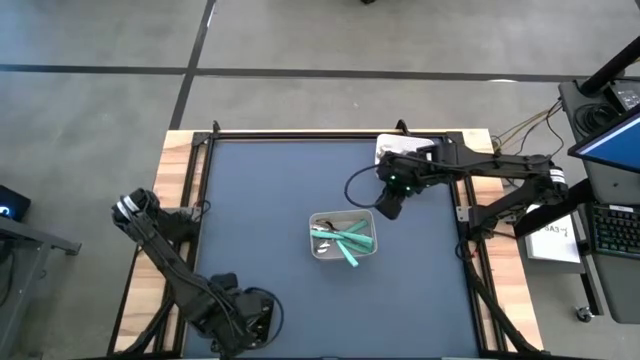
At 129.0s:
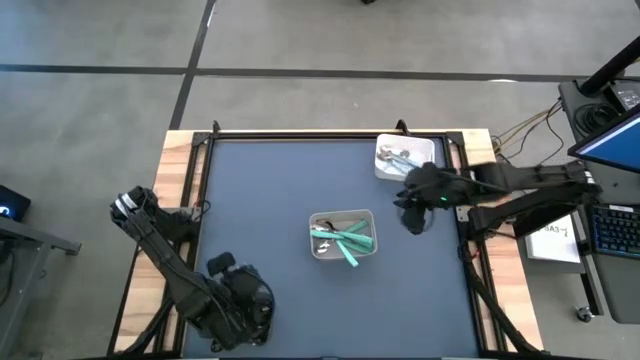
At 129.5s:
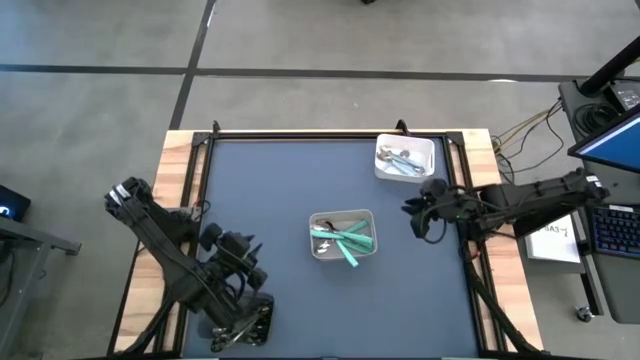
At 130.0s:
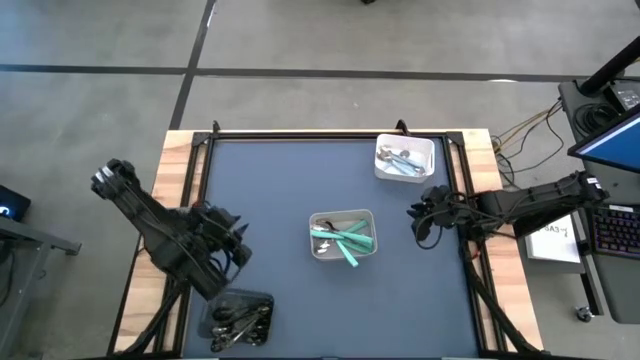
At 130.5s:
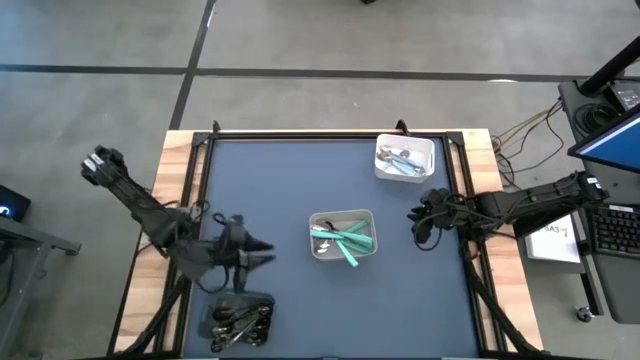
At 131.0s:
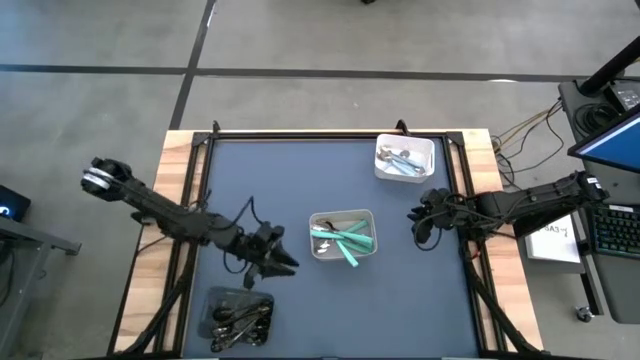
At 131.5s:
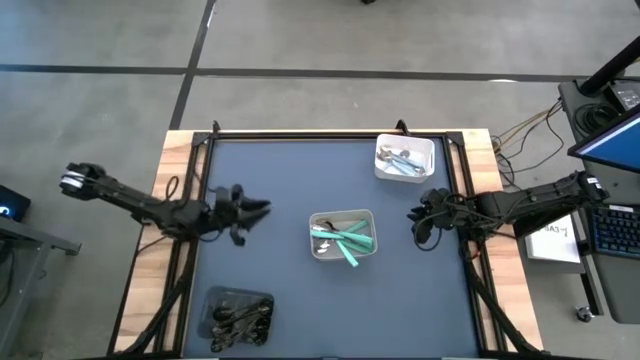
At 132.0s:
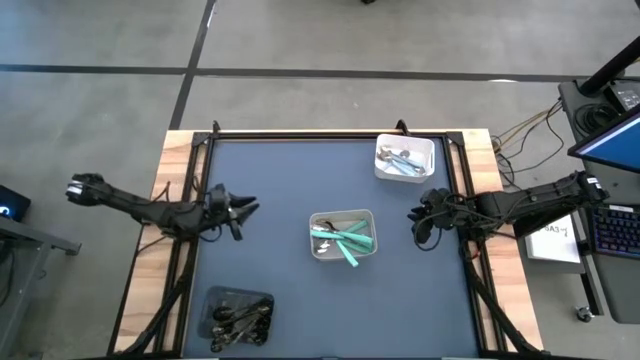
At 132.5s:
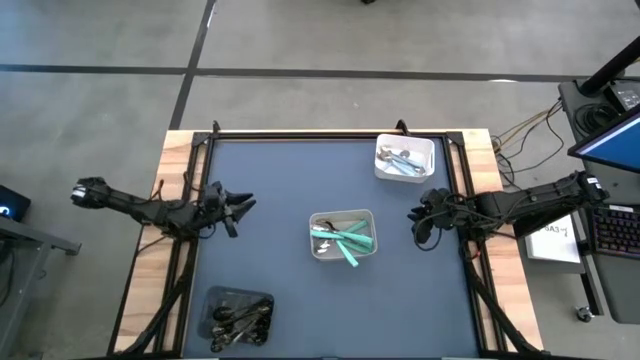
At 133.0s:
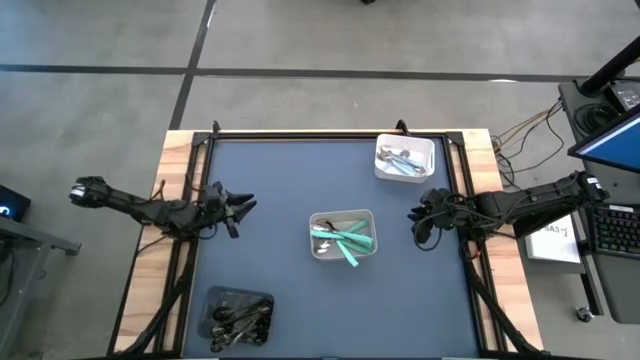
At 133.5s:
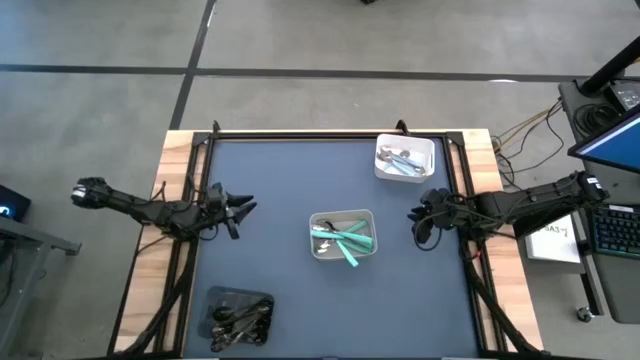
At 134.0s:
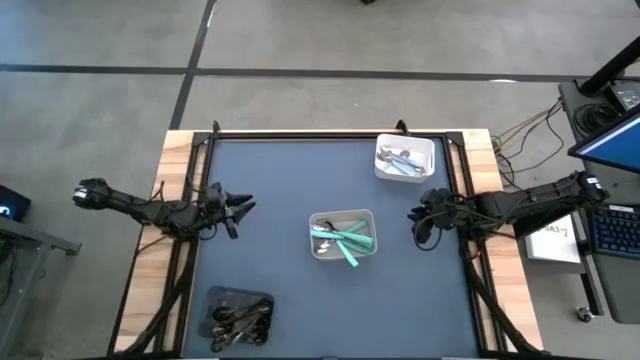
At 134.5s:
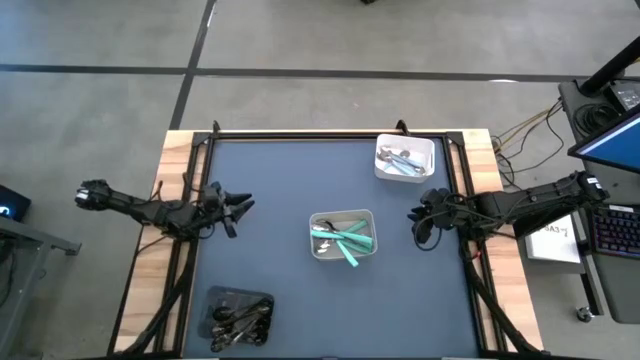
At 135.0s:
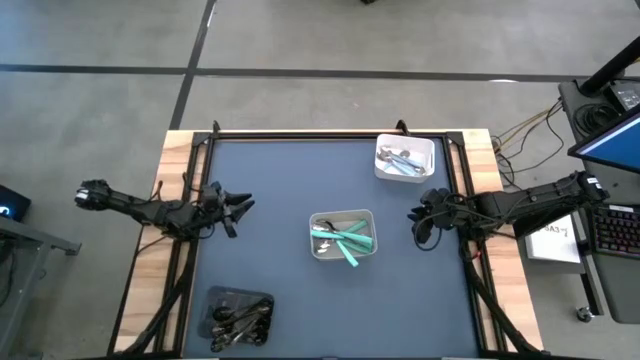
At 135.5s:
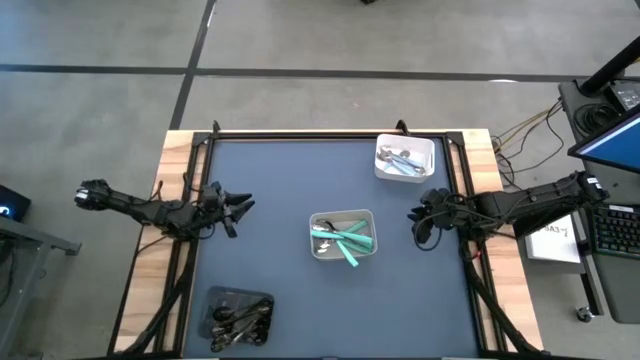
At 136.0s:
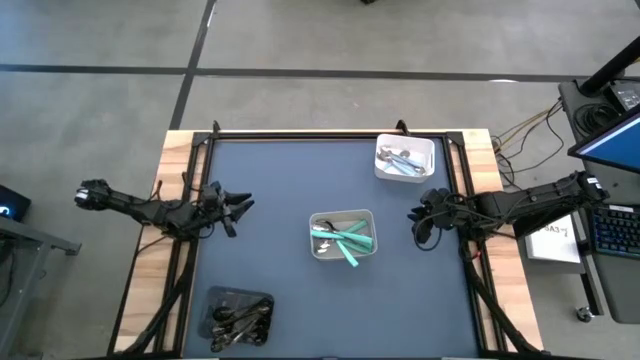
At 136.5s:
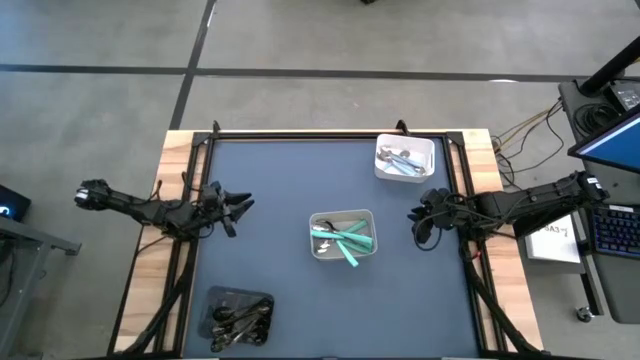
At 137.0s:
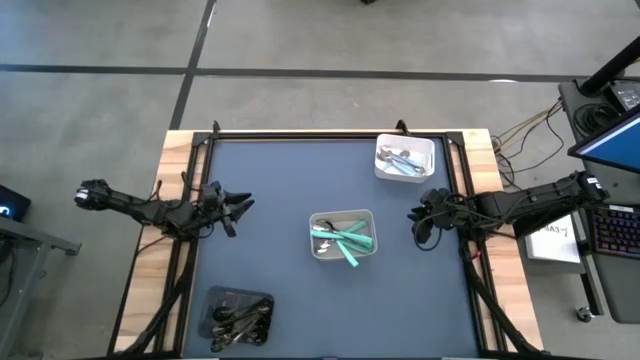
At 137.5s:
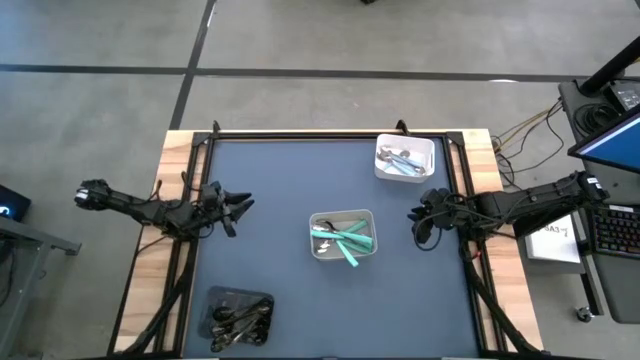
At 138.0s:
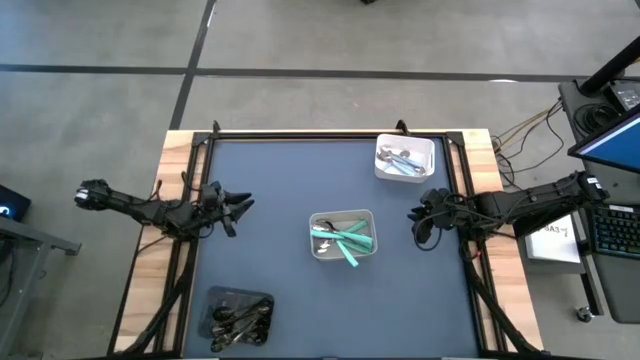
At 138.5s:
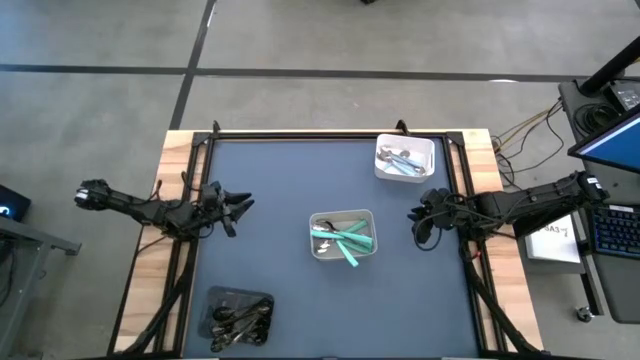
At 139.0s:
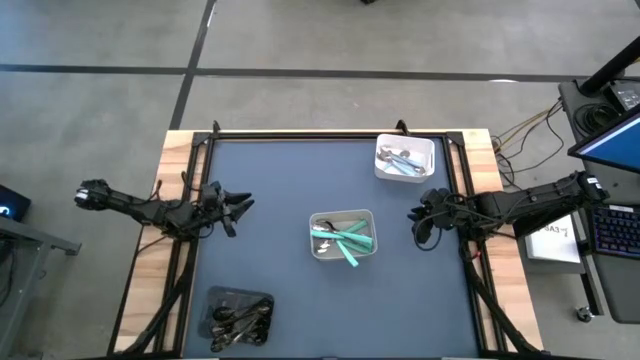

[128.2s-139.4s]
Task: Sort silverware by color (type)
Return to Home Position

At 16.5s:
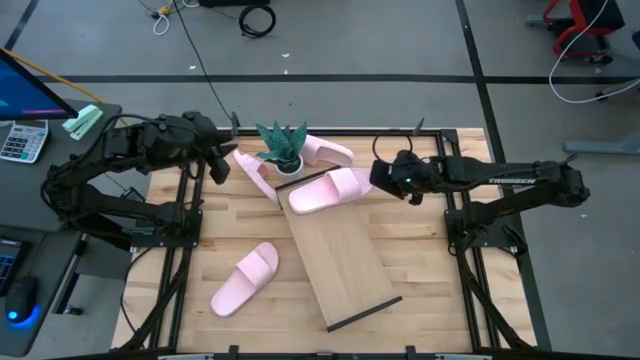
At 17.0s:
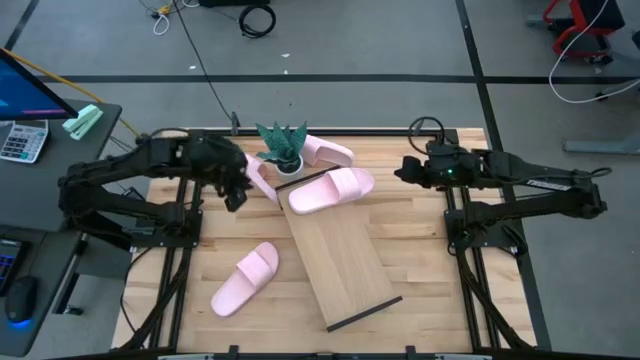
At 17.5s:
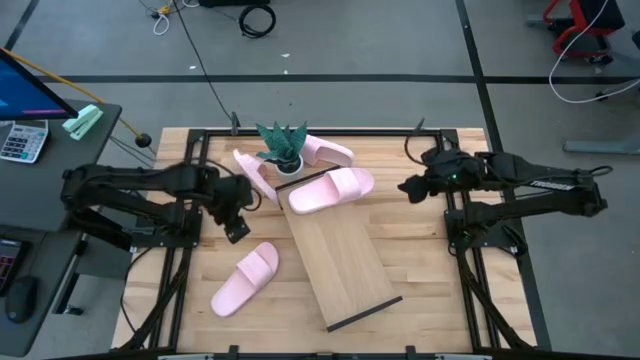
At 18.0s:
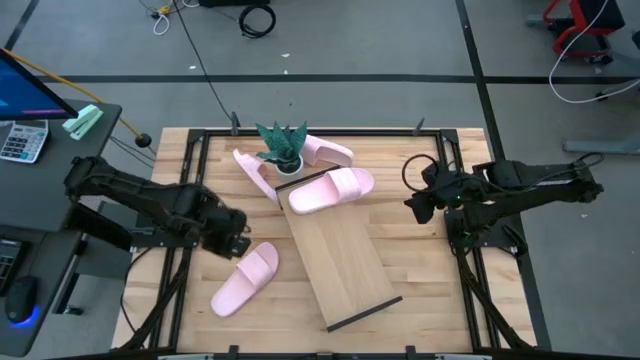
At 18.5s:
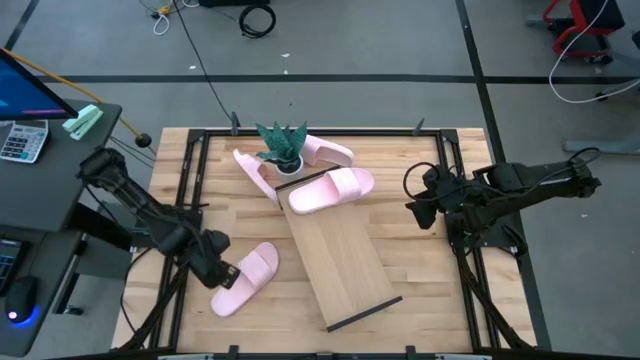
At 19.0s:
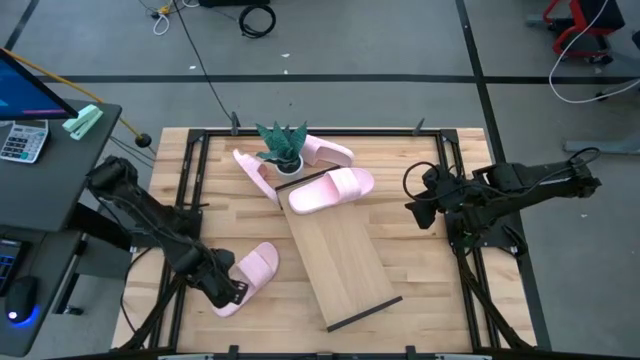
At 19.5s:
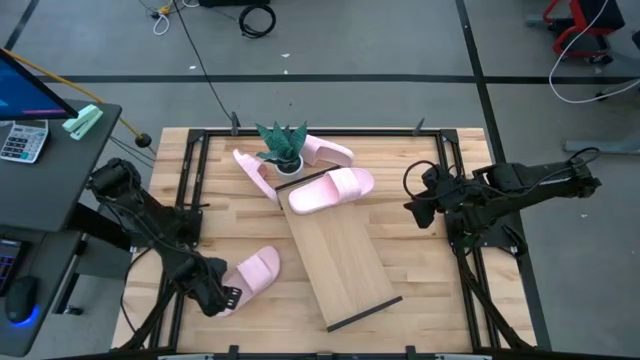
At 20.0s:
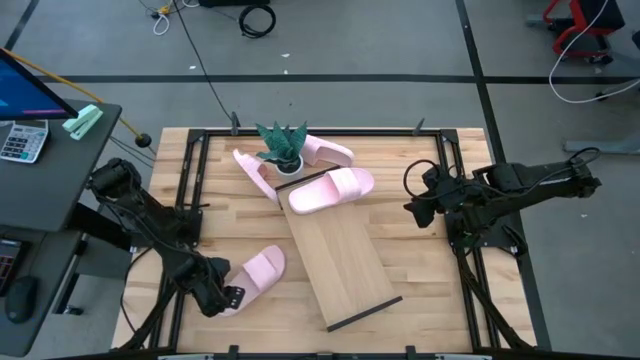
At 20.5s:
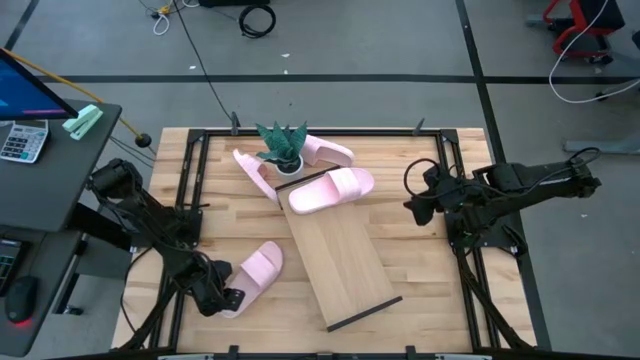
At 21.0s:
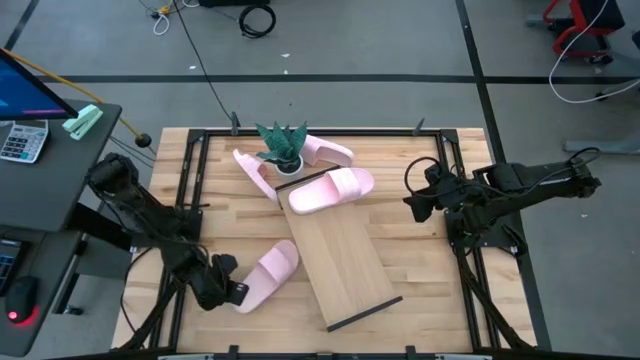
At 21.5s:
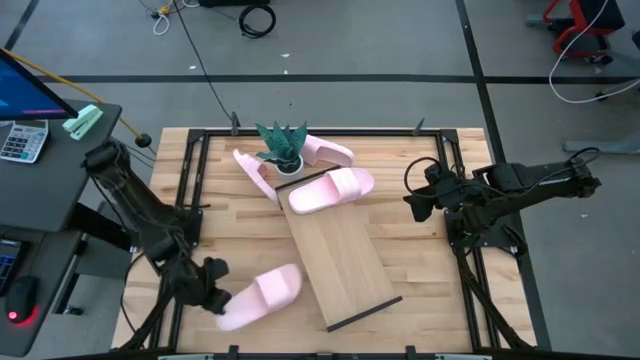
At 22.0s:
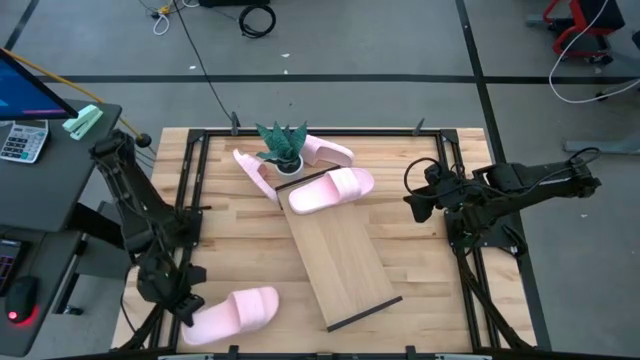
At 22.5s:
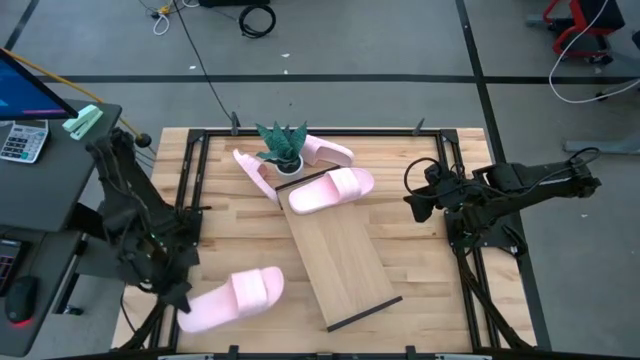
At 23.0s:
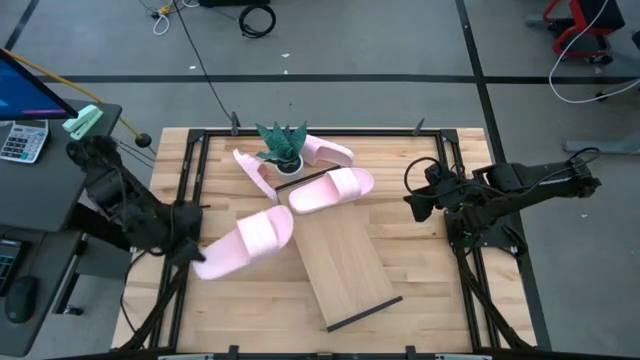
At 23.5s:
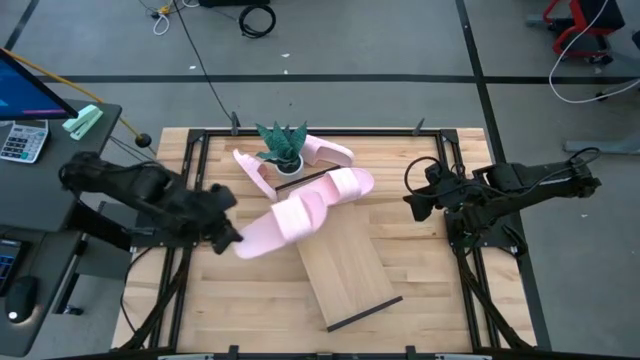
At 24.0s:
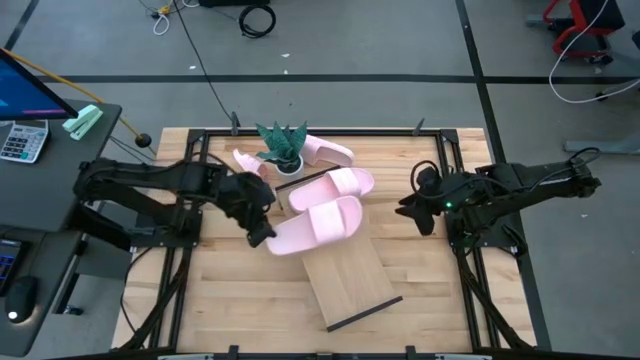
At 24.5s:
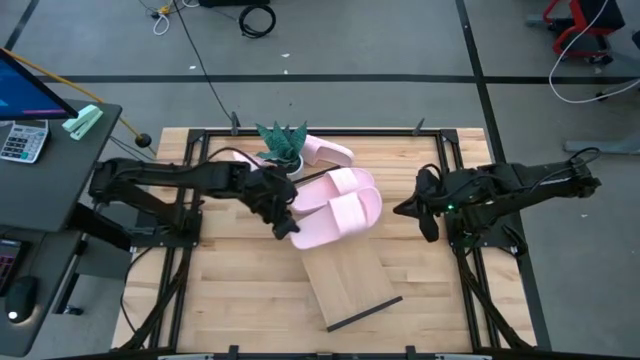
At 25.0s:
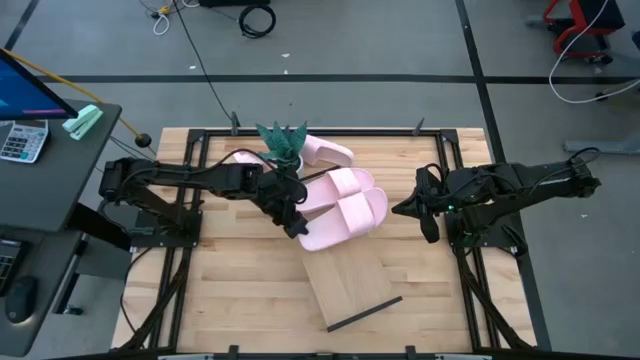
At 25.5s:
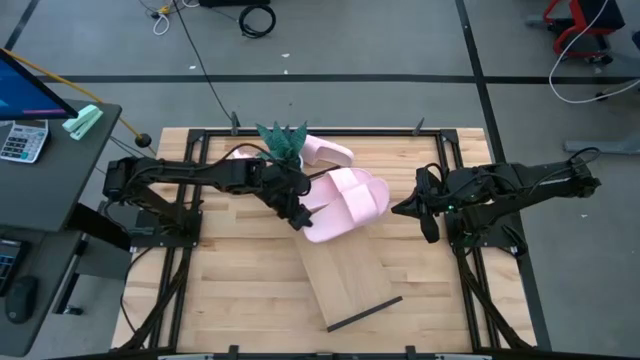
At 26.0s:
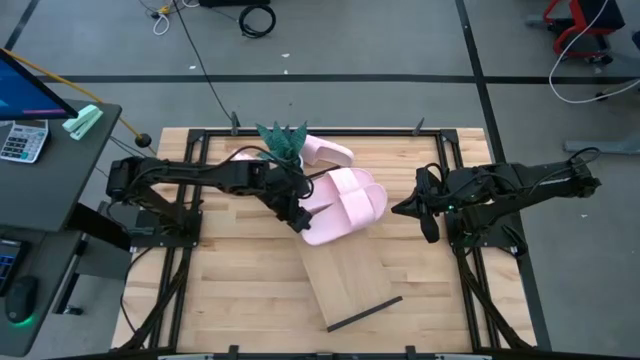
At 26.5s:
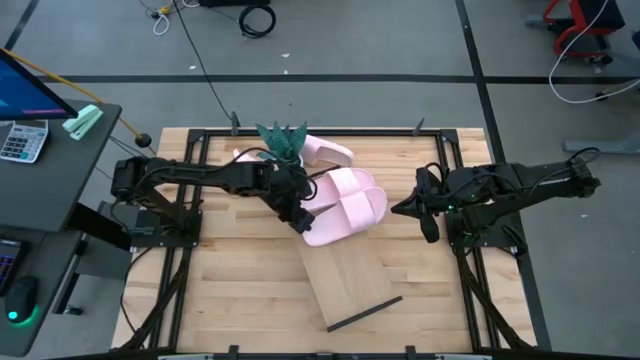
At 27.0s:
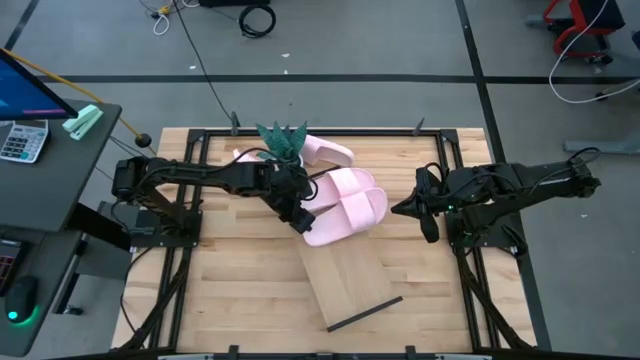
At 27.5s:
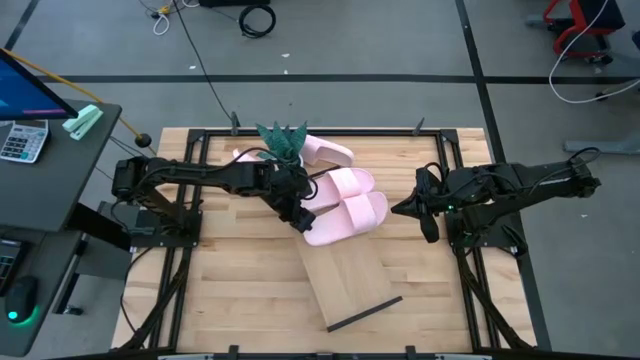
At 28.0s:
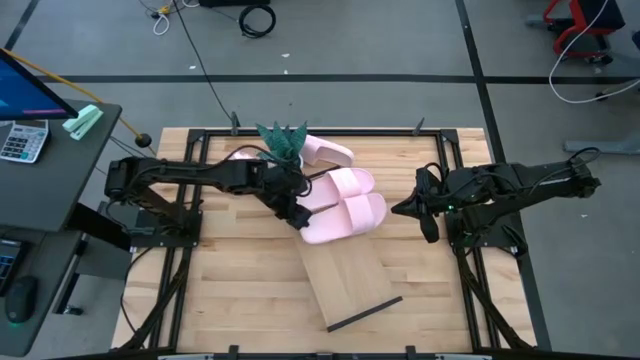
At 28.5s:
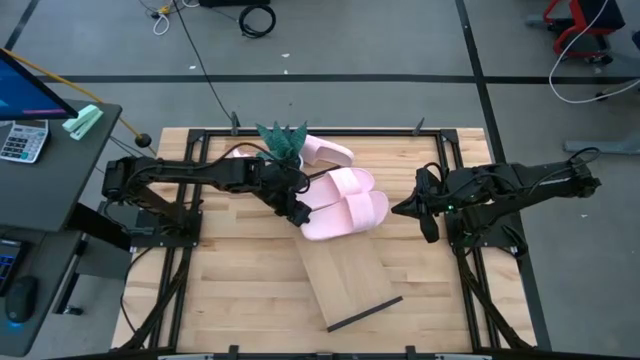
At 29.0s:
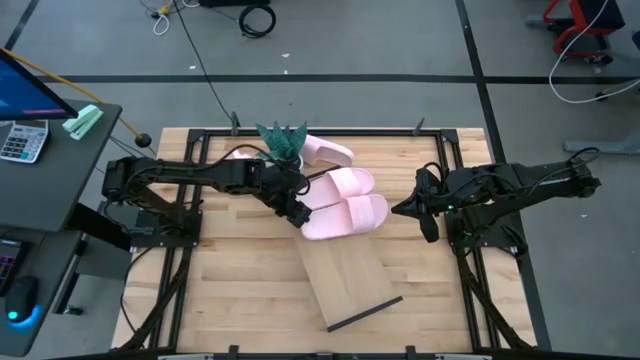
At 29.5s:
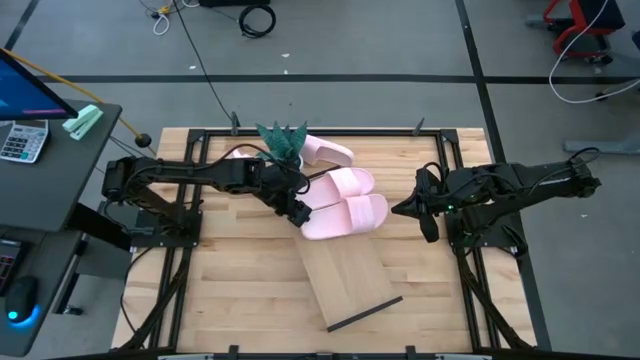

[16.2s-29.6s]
Task: Pick and place slides into the shelf
Put the bottom left pink slipper on the shelf
